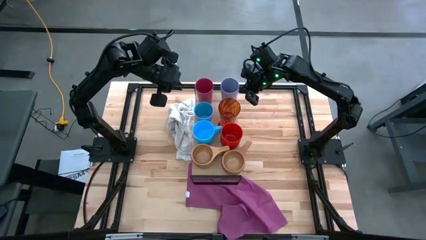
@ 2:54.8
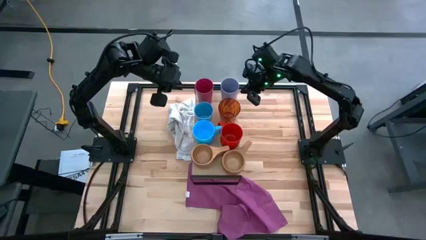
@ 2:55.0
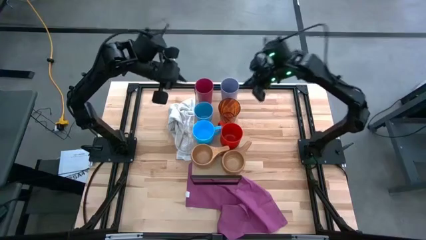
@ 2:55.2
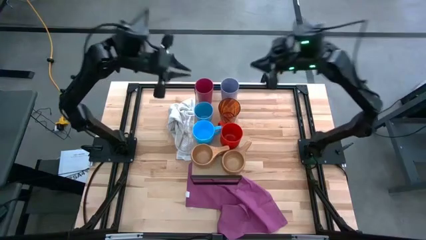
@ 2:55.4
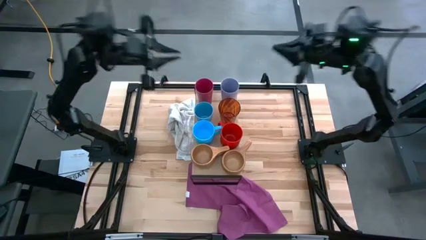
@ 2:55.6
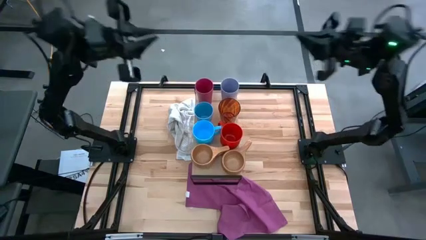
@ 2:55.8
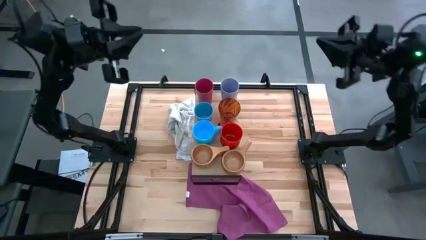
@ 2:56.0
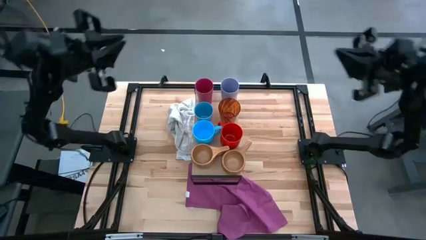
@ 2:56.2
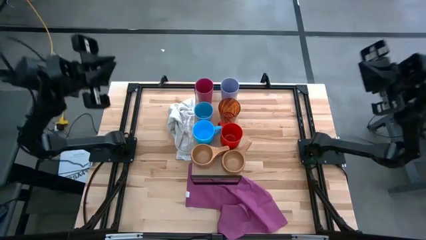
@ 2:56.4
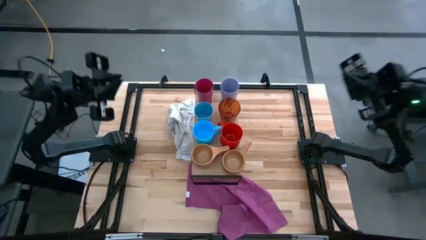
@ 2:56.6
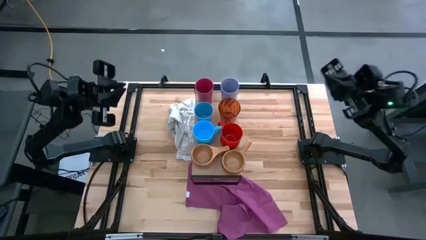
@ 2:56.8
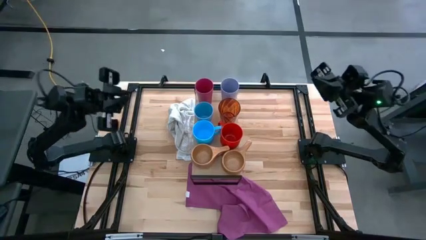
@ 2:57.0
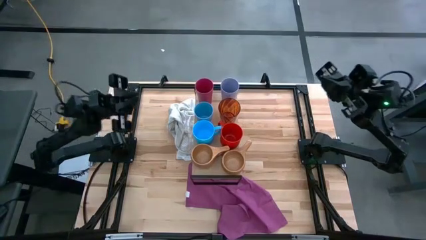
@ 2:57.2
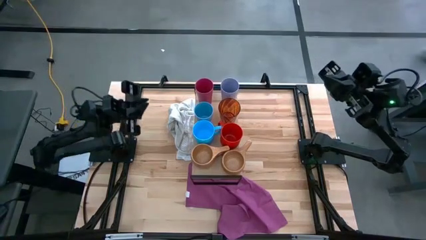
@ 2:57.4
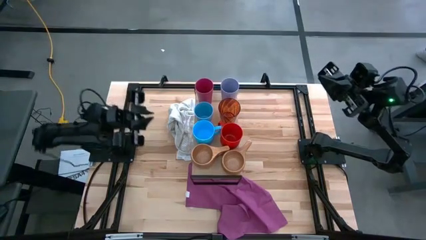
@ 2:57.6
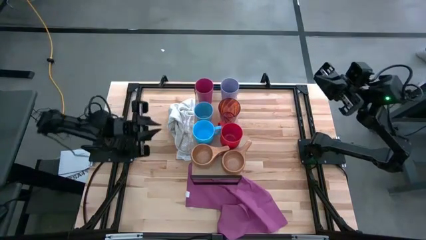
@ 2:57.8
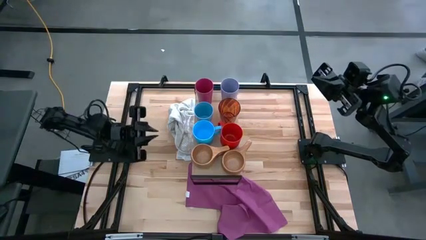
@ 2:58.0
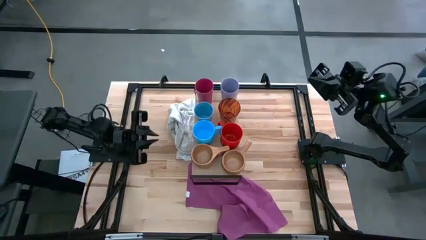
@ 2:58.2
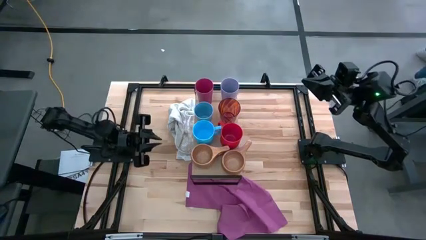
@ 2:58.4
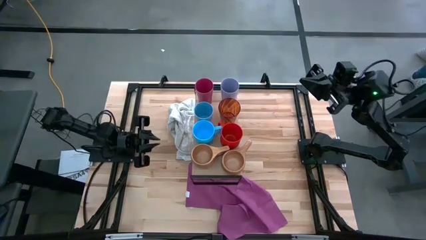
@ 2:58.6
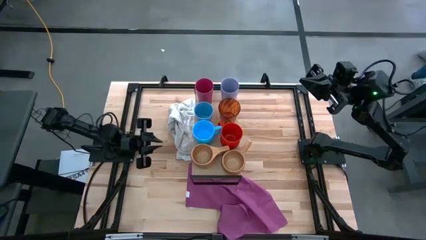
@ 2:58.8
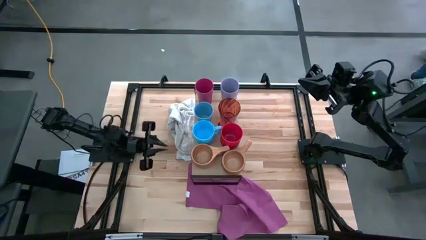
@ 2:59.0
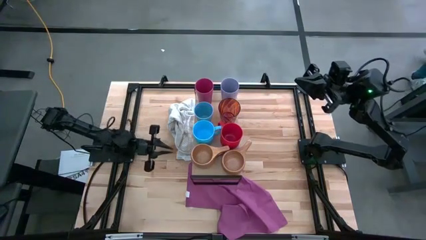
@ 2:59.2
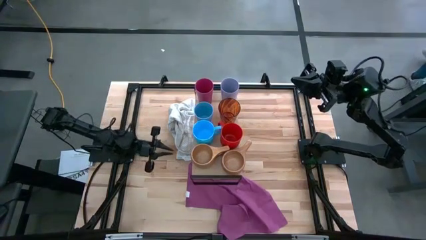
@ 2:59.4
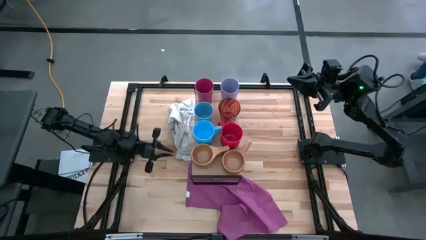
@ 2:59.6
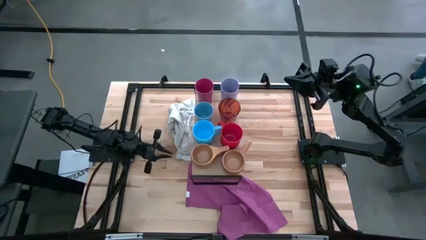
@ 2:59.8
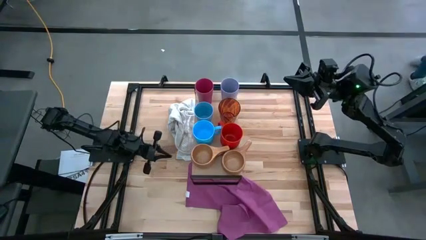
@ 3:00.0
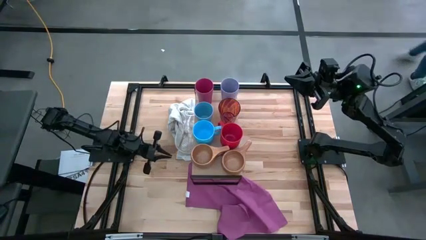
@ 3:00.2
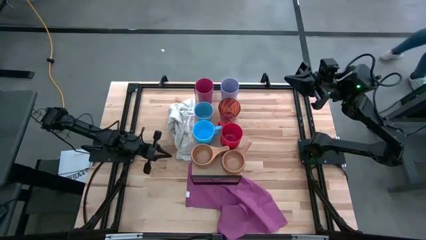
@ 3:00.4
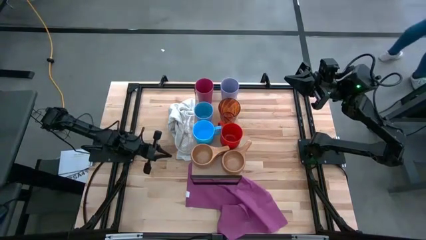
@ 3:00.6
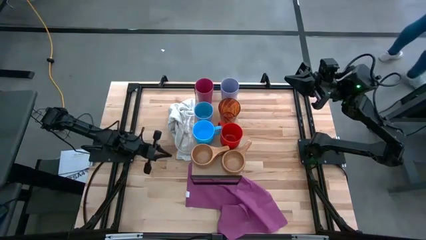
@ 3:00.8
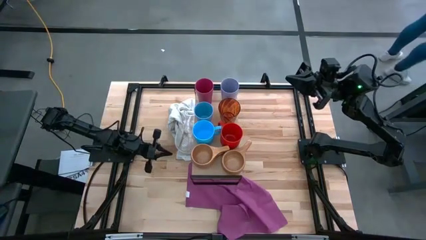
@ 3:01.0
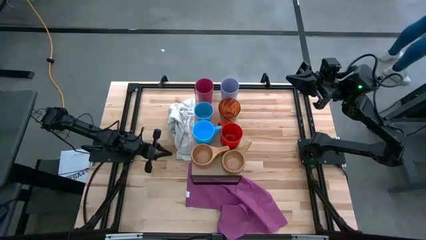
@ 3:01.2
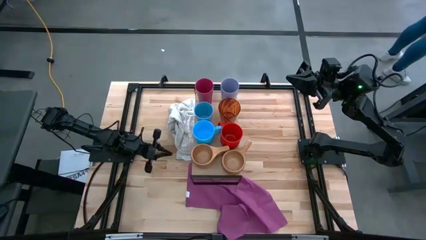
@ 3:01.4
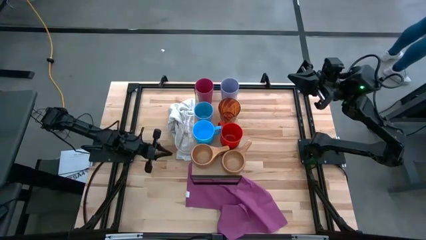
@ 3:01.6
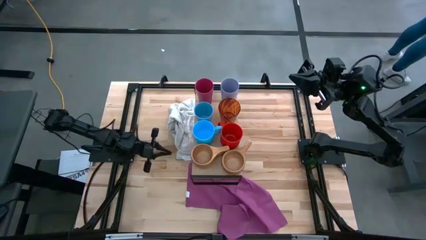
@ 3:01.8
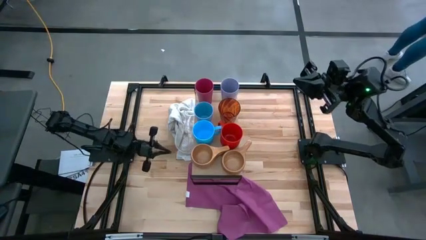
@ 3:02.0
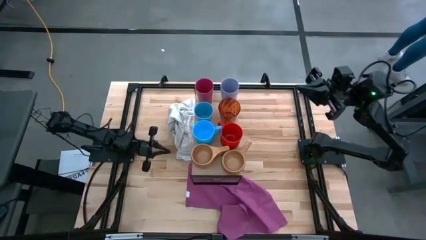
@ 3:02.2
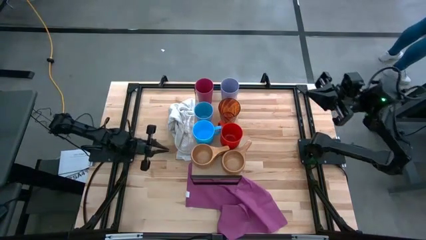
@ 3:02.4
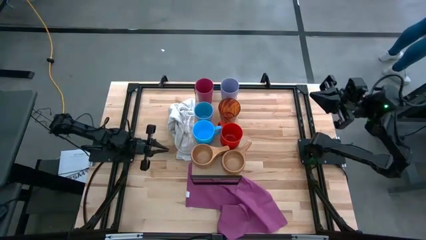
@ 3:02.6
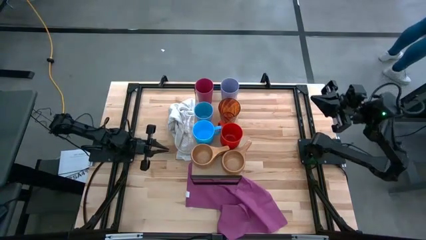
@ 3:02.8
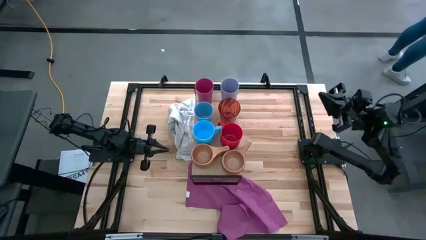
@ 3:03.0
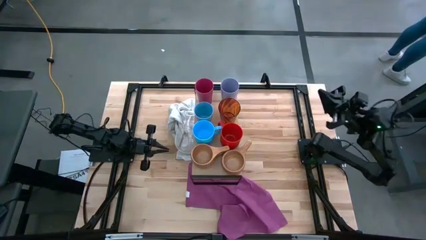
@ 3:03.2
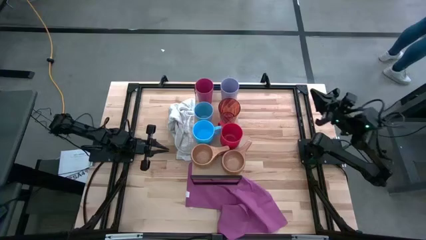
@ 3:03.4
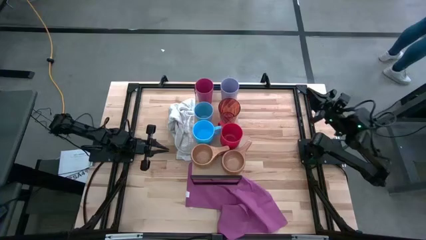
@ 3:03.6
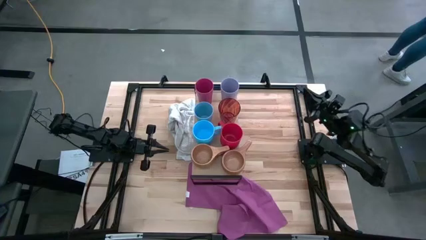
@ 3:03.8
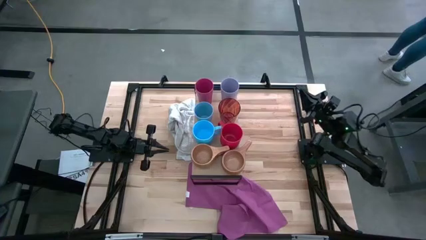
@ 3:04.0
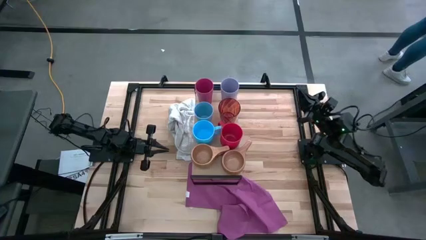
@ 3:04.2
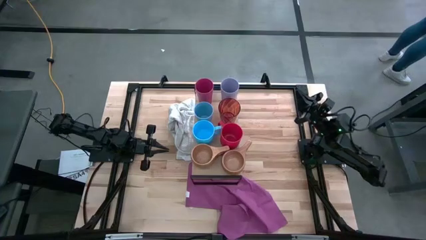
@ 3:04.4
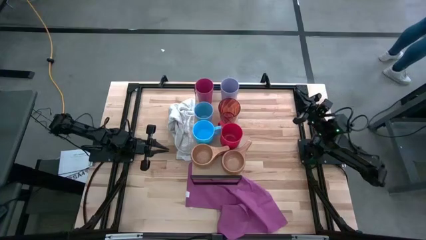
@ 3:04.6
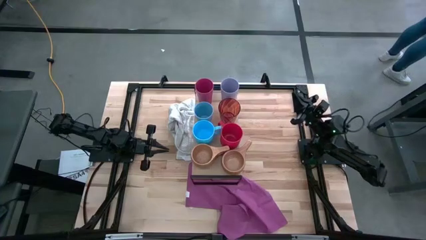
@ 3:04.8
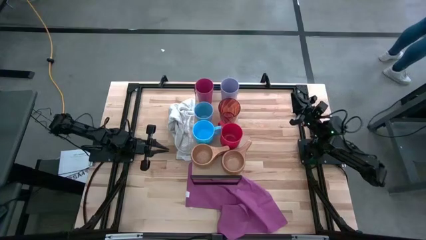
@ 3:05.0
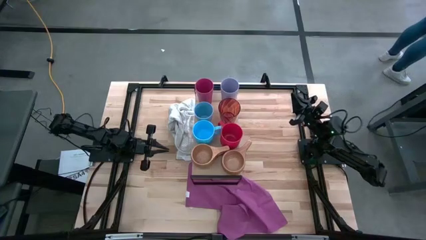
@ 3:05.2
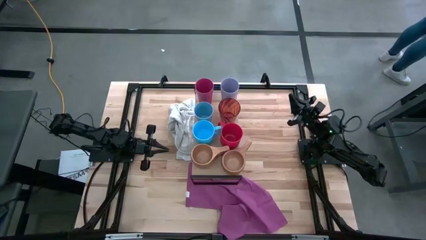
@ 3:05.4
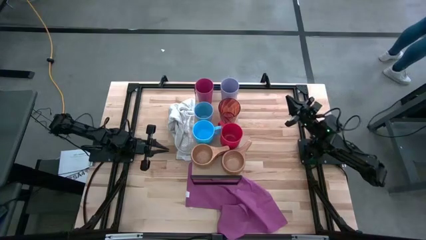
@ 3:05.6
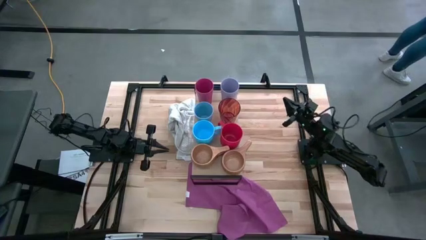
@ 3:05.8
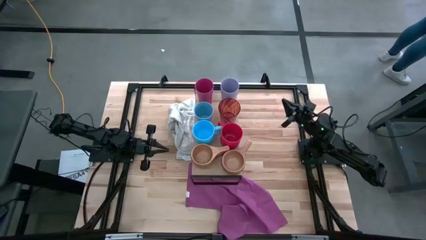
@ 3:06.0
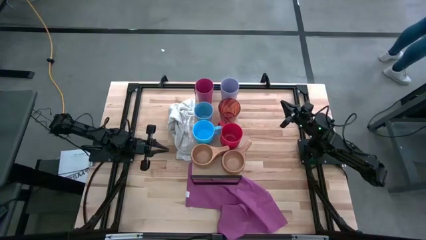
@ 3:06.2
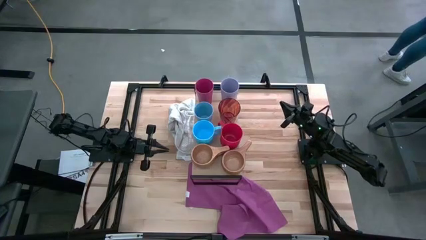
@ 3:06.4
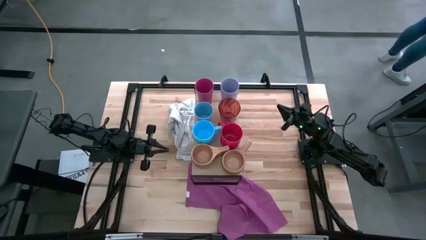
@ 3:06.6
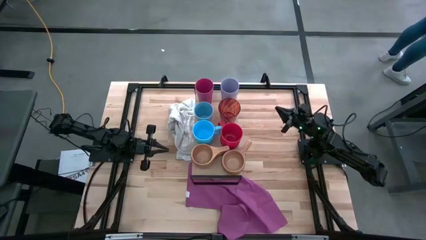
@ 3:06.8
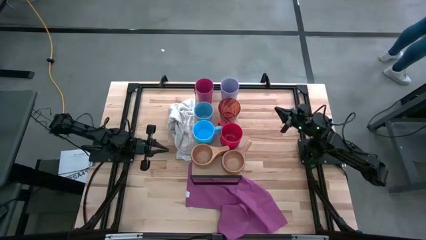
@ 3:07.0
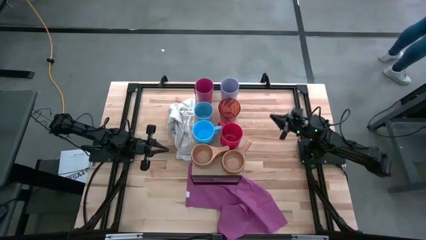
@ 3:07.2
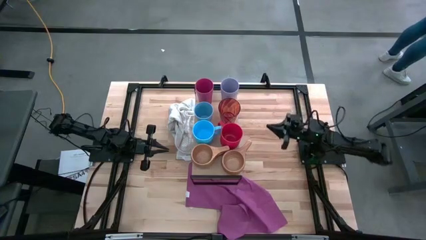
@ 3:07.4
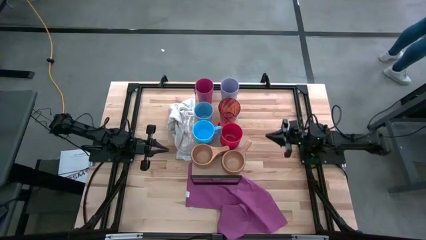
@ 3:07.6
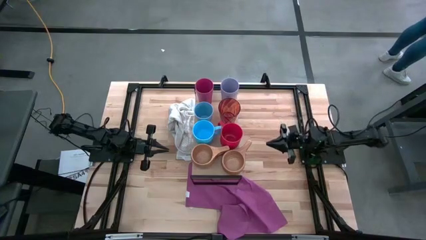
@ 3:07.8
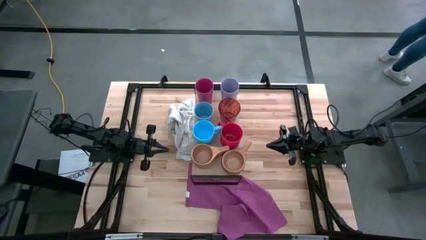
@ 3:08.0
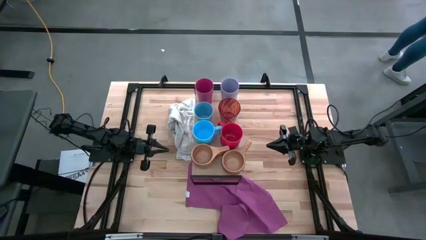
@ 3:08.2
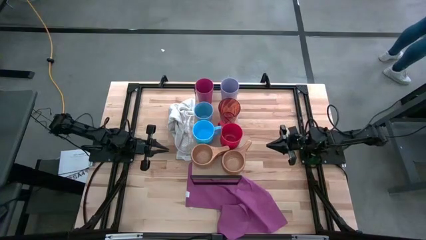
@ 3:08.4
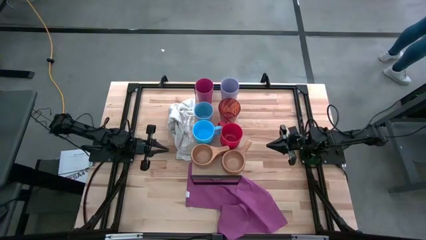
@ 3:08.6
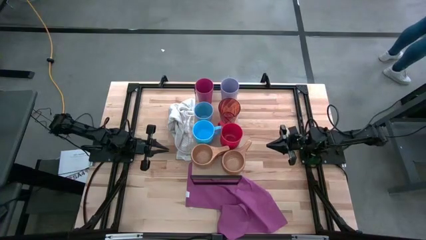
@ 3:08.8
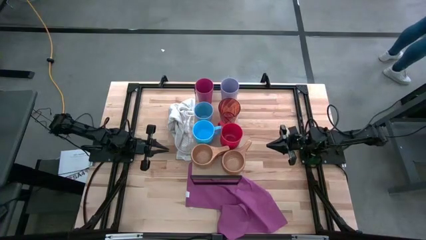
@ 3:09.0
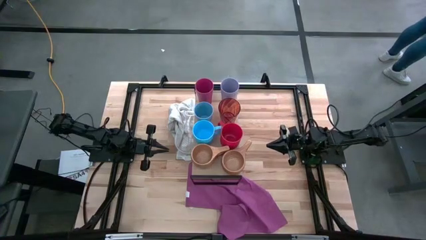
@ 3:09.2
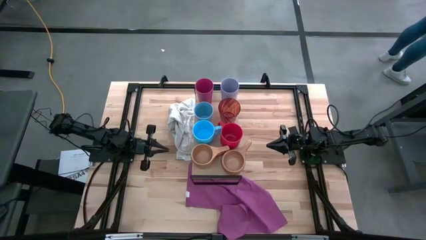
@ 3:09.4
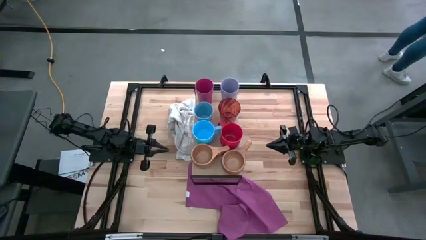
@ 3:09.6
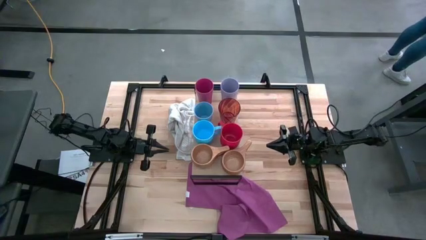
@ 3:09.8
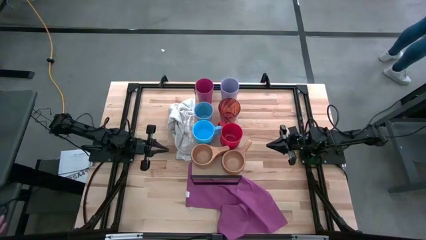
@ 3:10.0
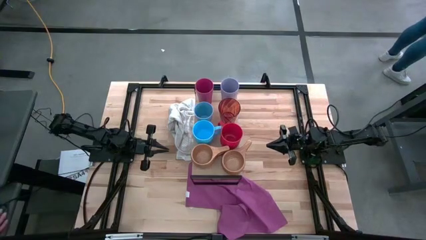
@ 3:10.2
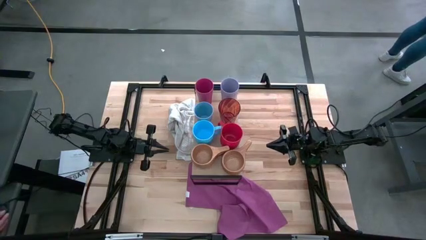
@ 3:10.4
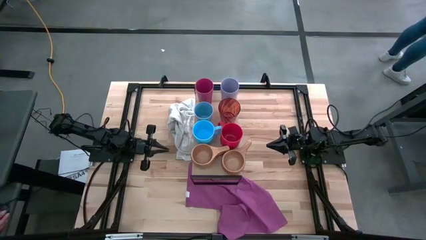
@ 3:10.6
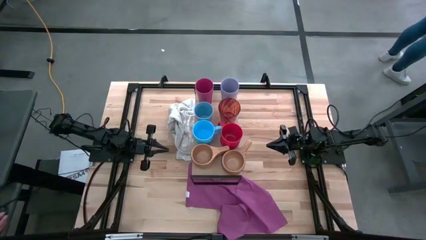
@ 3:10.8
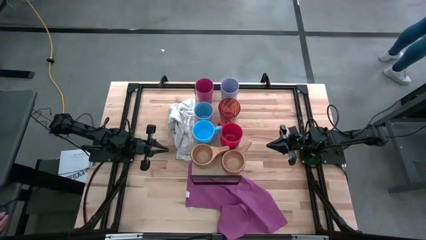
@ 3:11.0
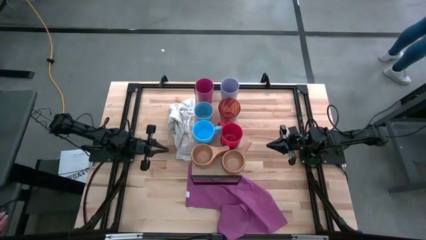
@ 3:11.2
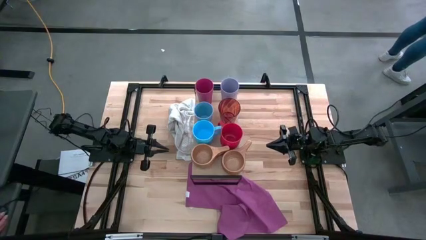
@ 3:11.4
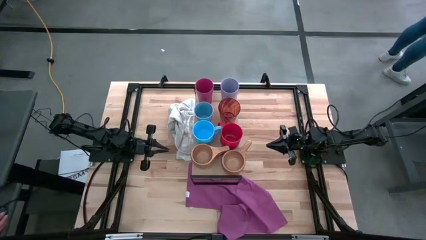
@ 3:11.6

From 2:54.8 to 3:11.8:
Task: Stack small to large cups/mugs on shelf
Return to Home Position
